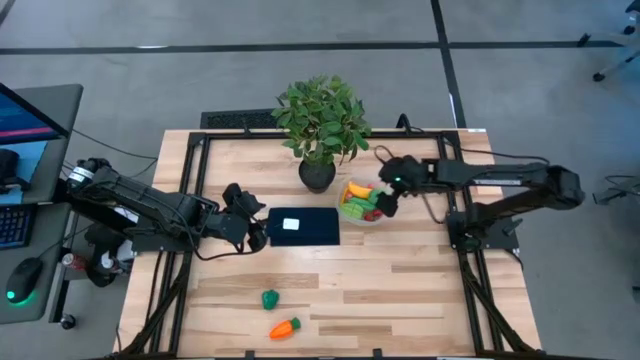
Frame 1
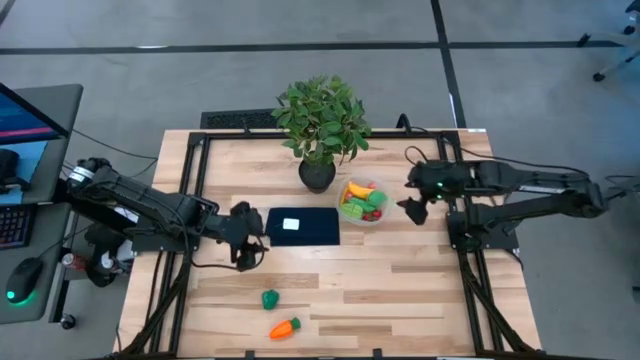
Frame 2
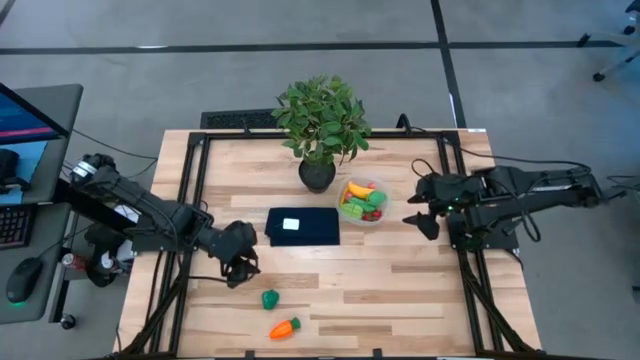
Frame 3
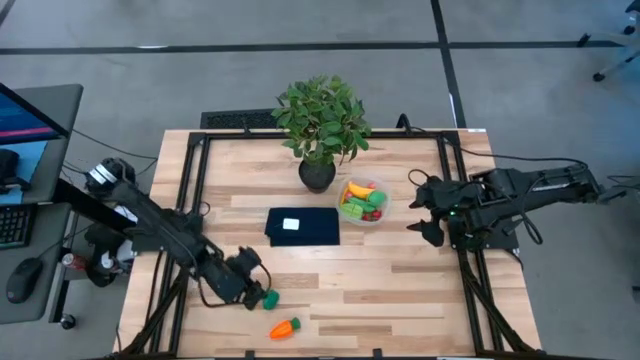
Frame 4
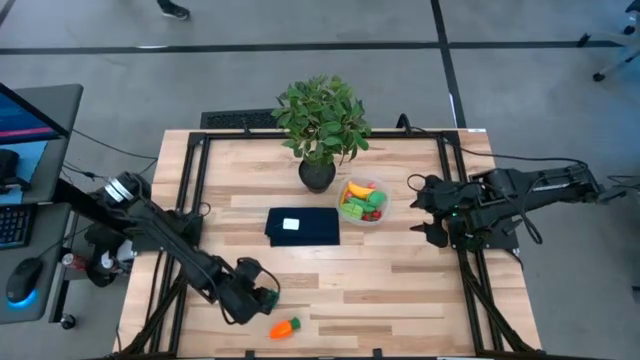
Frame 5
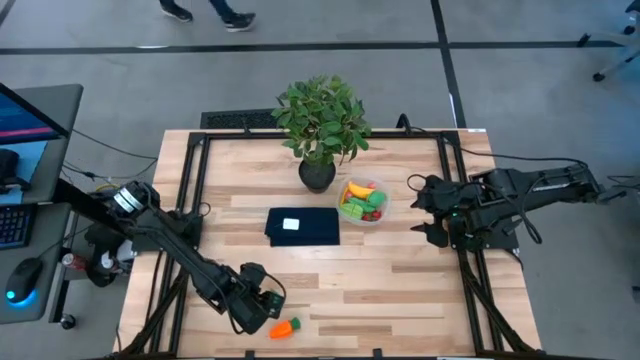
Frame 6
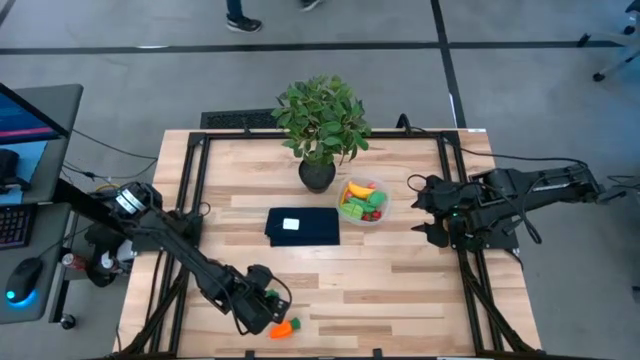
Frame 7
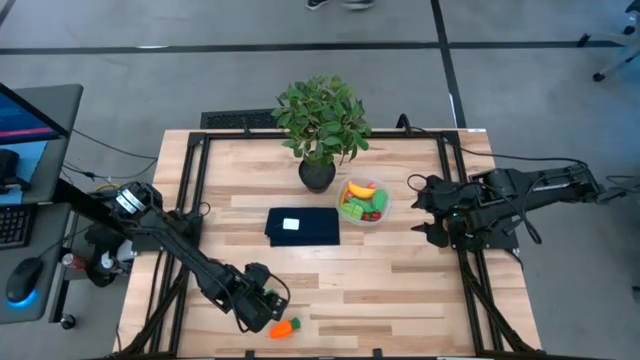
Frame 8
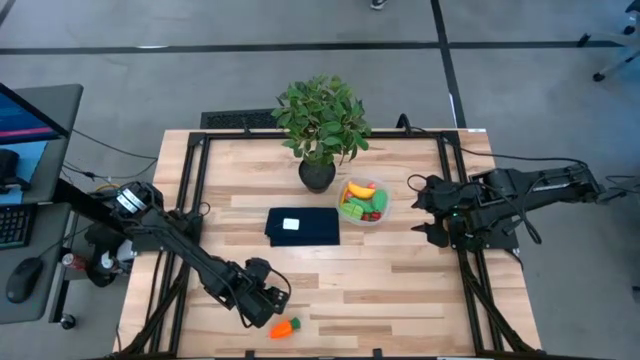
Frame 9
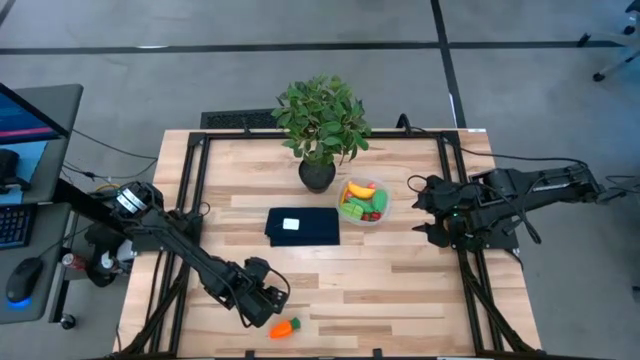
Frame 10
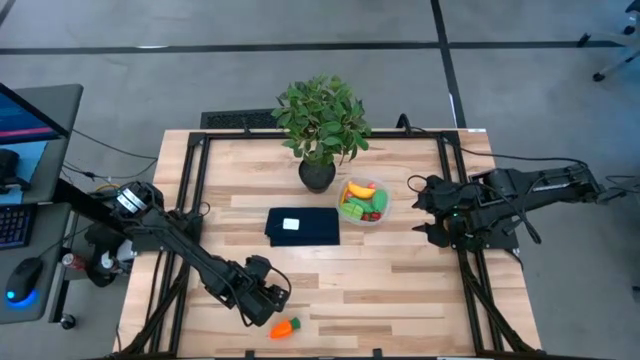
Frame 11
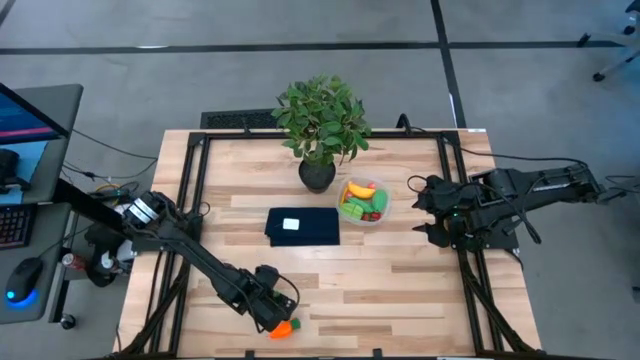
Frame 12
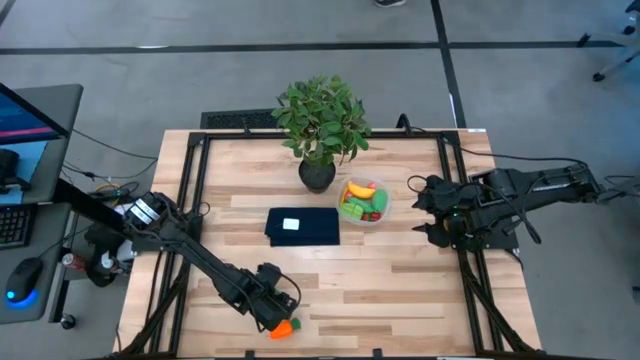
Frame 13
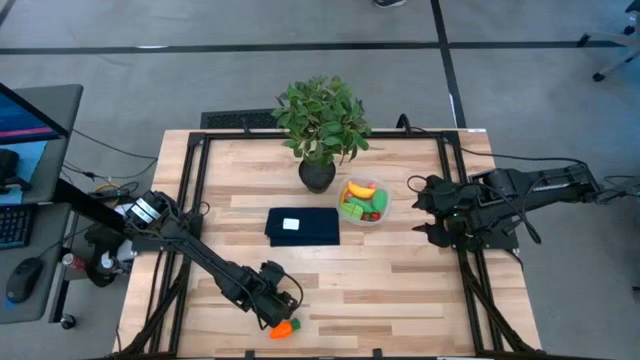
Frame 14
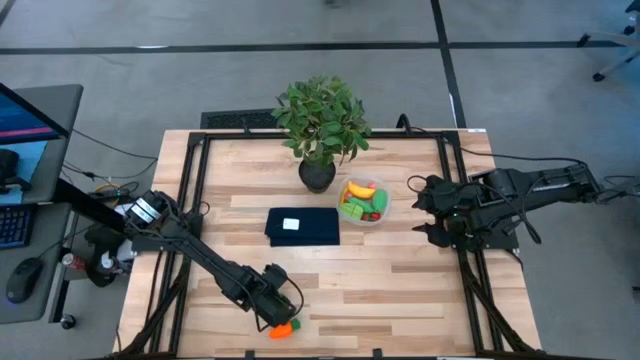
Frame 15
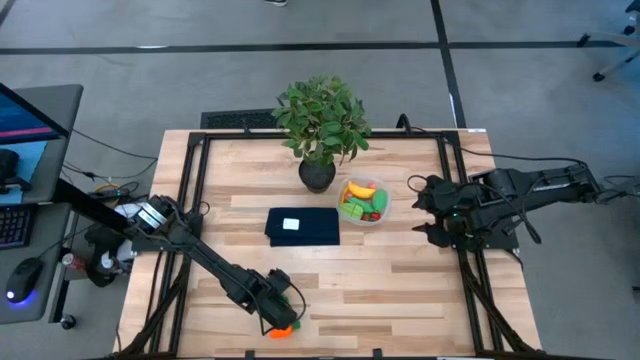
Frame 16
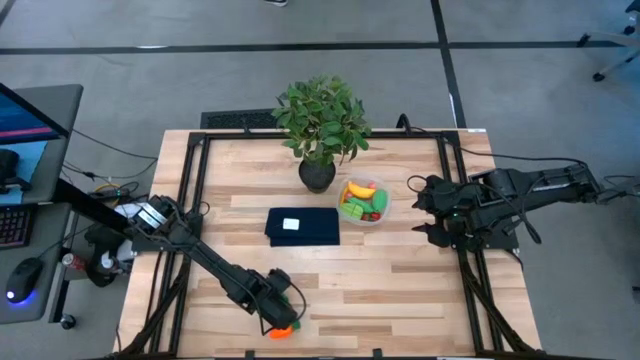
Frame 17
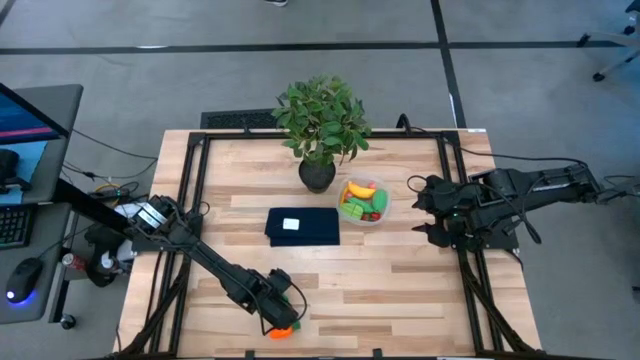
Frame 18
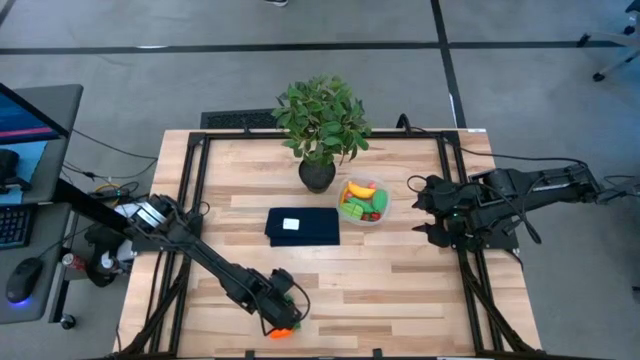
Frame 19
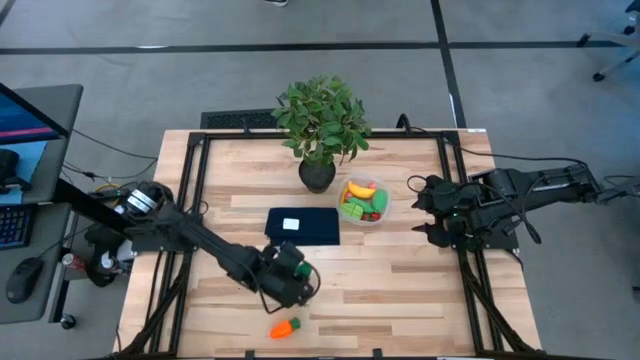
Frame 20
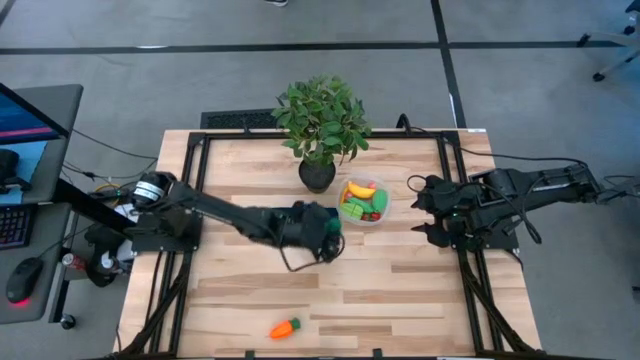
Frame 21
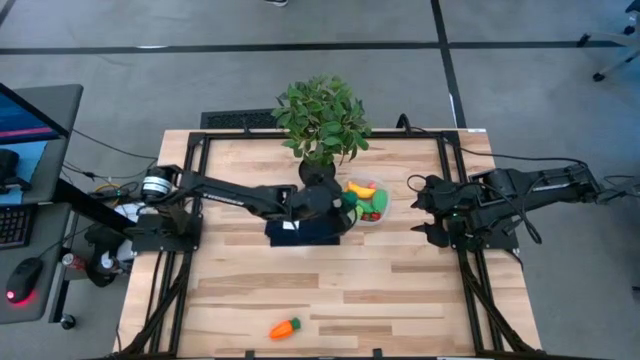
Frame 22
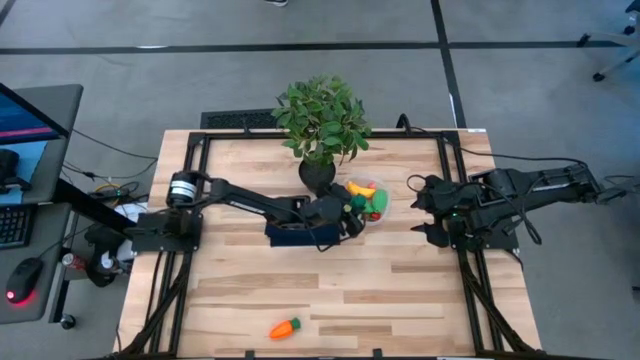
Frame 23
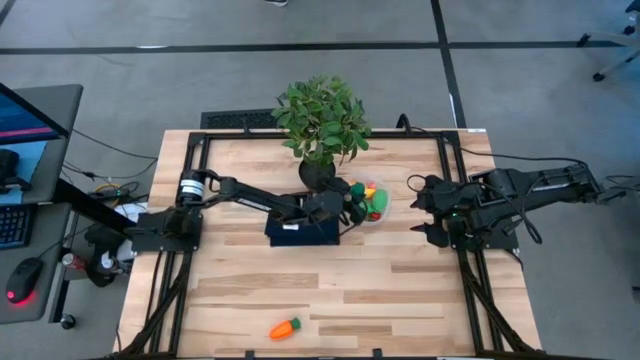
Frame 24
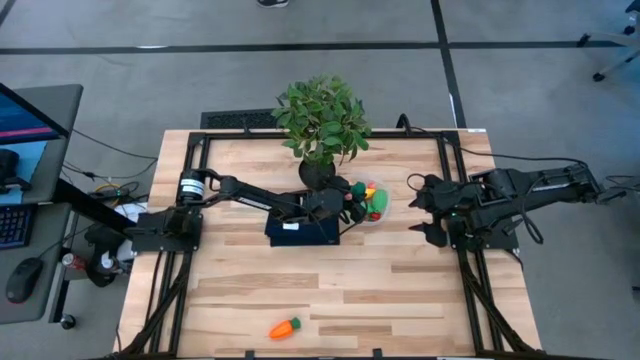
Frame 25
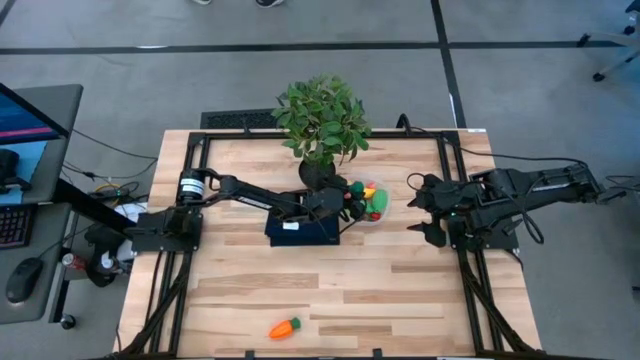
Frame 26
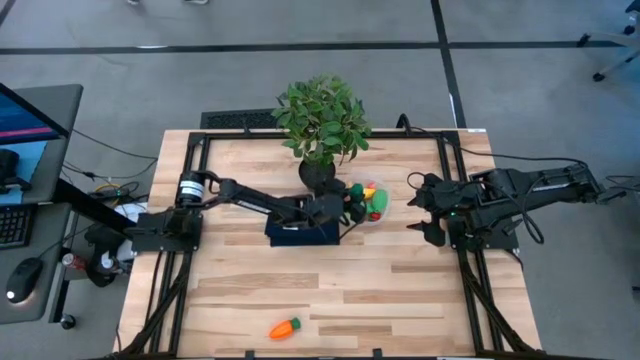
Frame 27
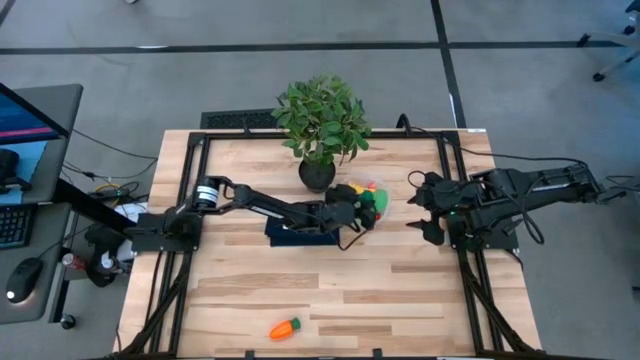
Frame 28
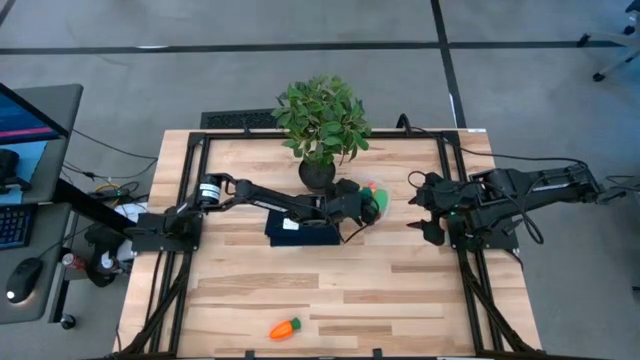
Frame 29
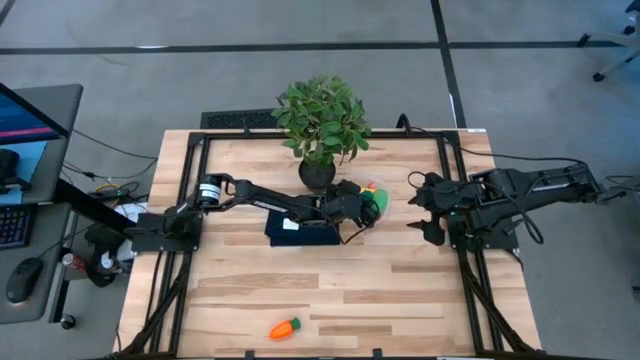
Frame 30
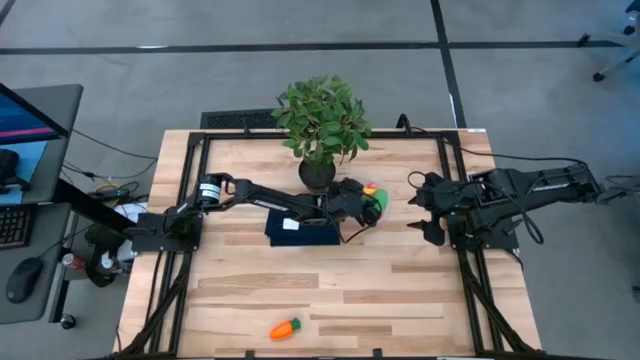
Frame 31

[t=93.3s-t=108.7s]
Task: Pick and placing Produce into tupperware
Put the green bell pepper into the transparent container

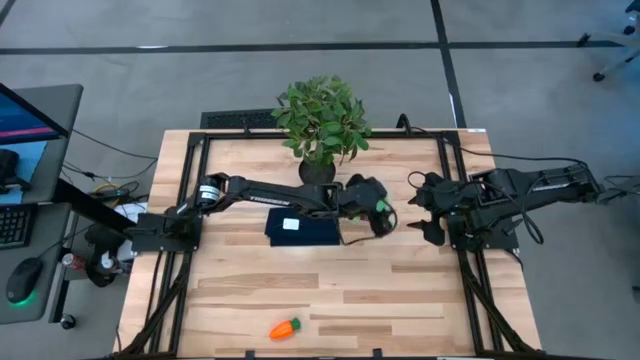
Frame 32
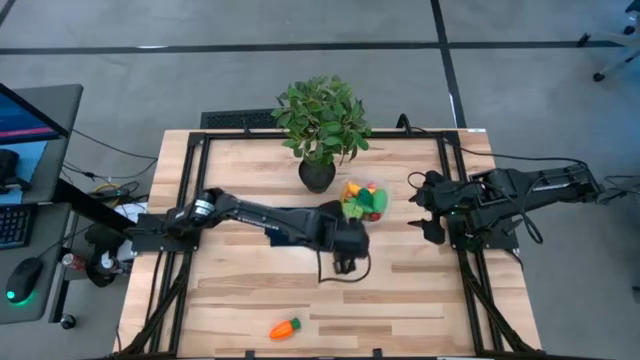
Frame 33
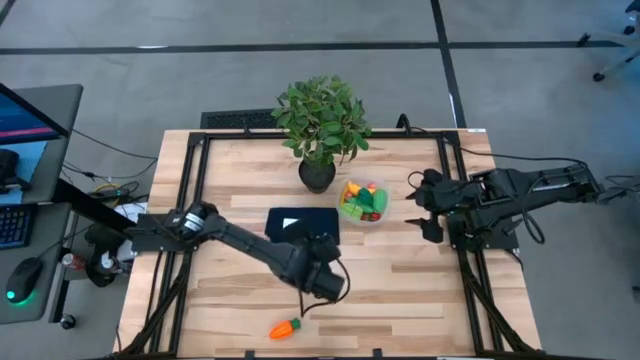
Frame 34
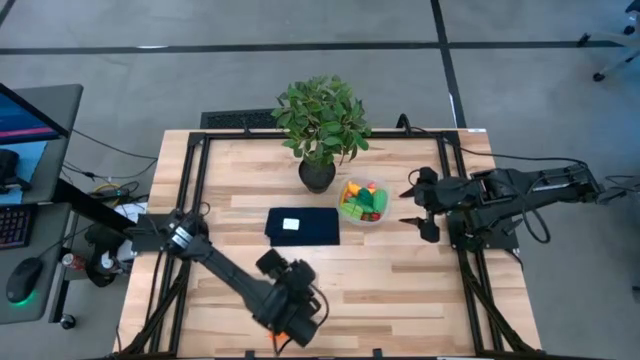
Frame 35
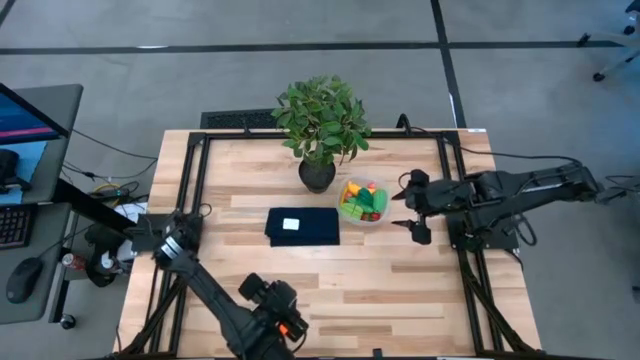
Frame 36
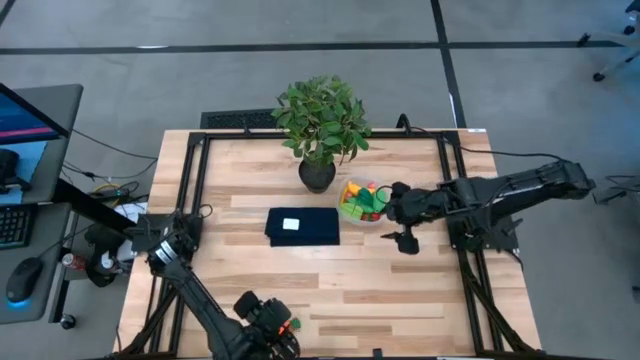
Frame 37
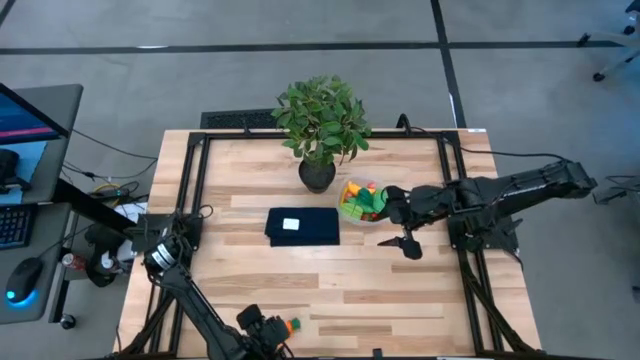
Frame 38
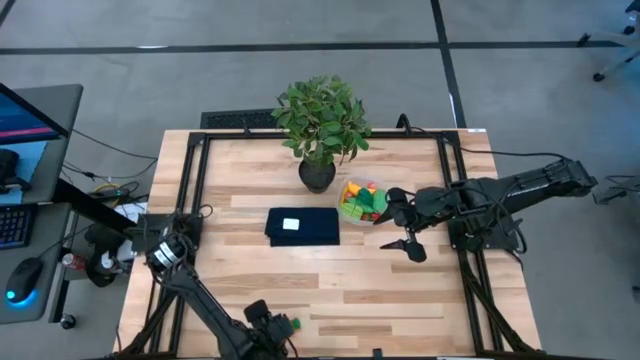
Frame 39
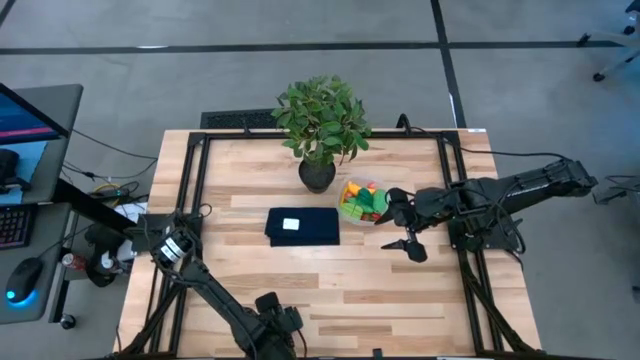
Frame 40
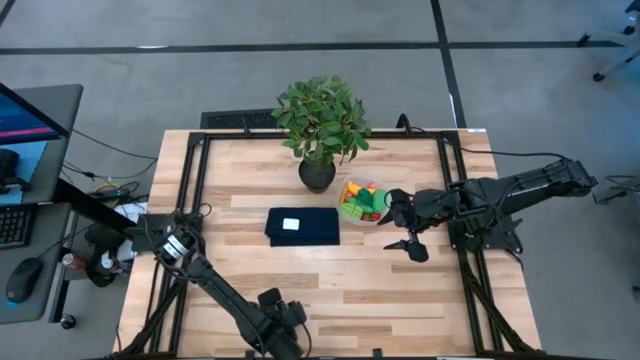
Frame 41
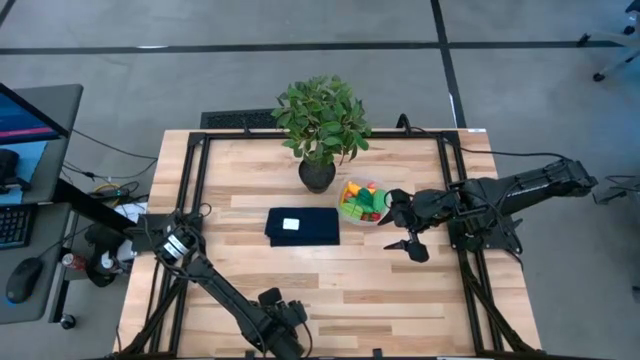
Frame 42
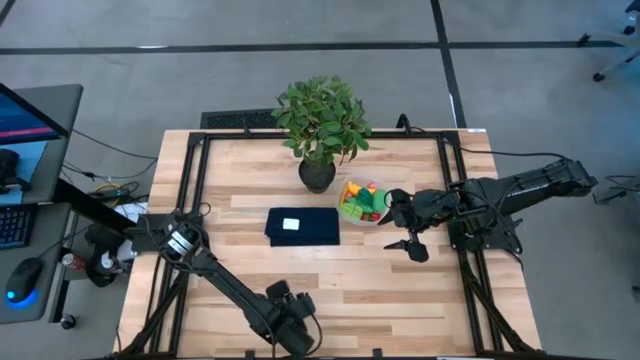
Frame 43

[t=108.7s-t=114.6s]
Put the orange carrot into the transparent container
